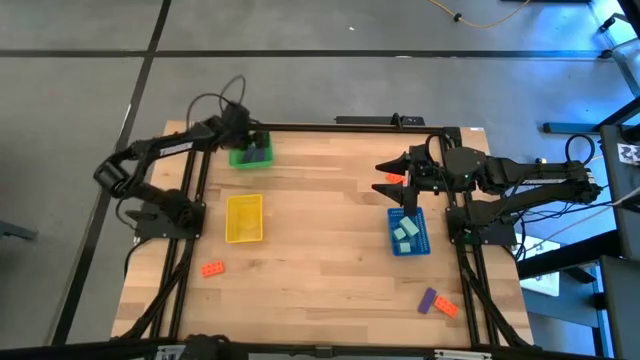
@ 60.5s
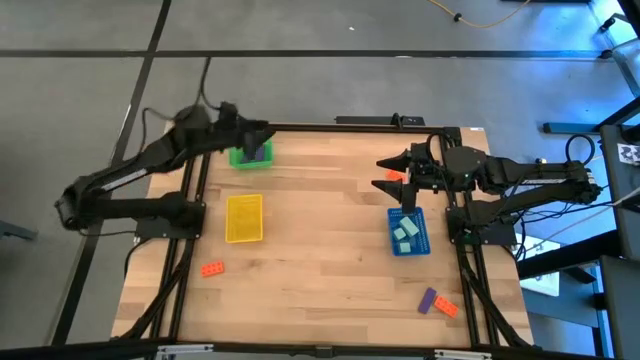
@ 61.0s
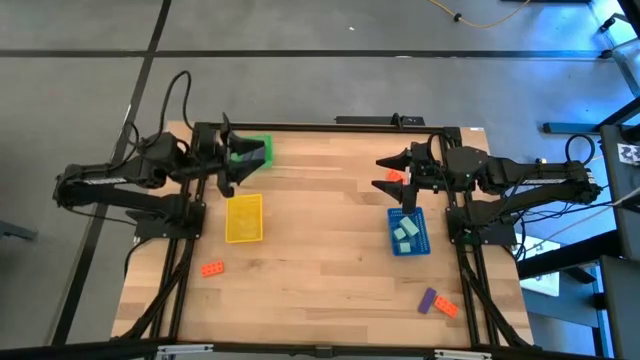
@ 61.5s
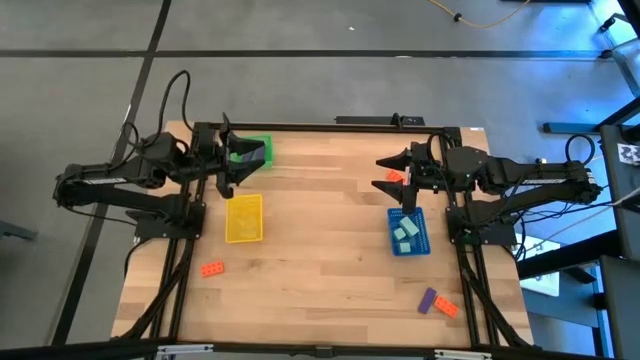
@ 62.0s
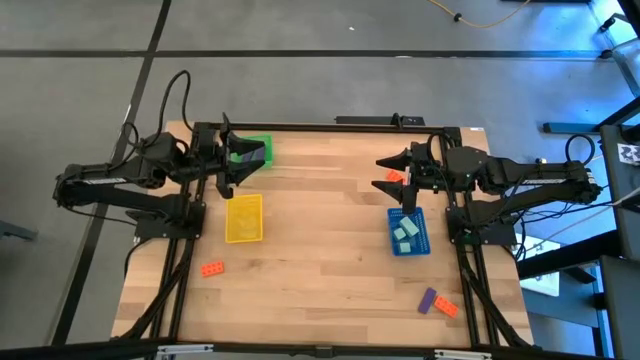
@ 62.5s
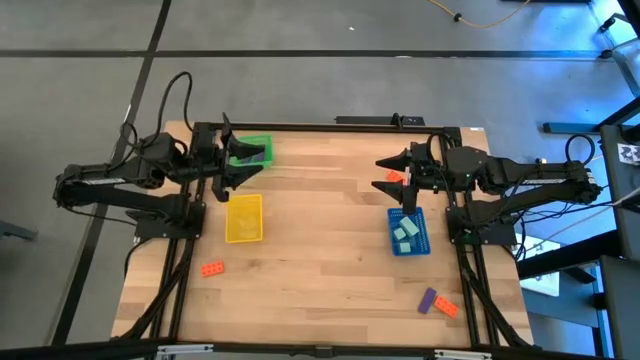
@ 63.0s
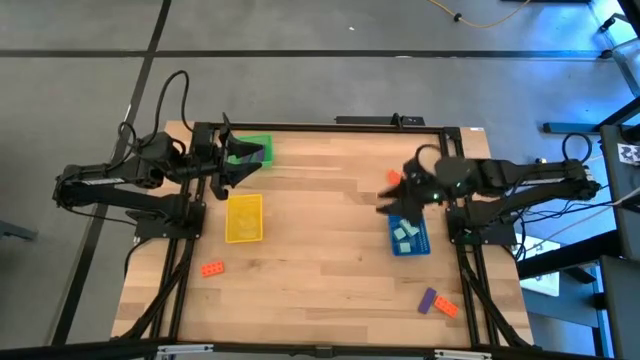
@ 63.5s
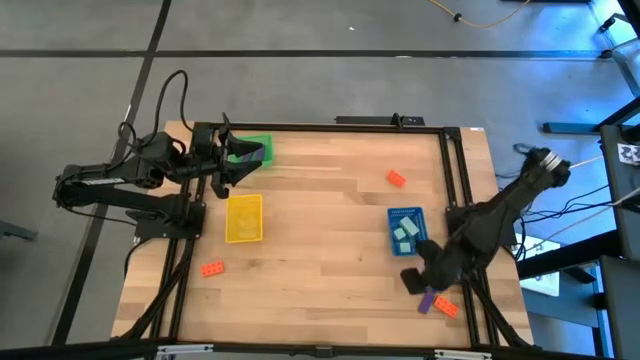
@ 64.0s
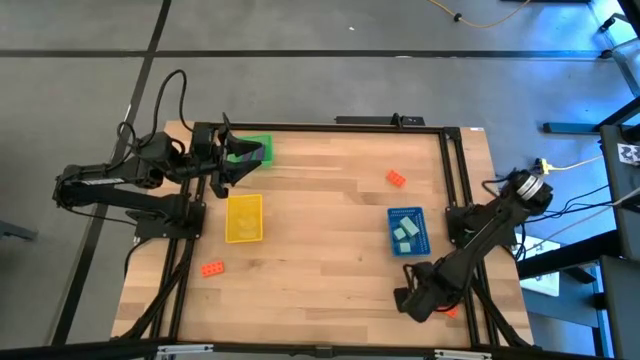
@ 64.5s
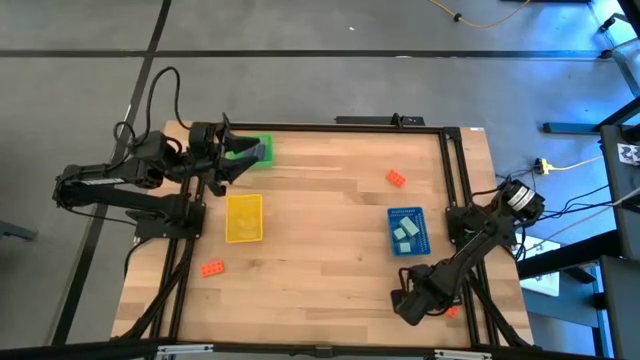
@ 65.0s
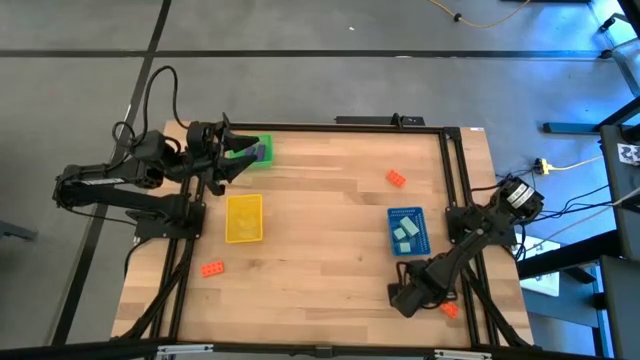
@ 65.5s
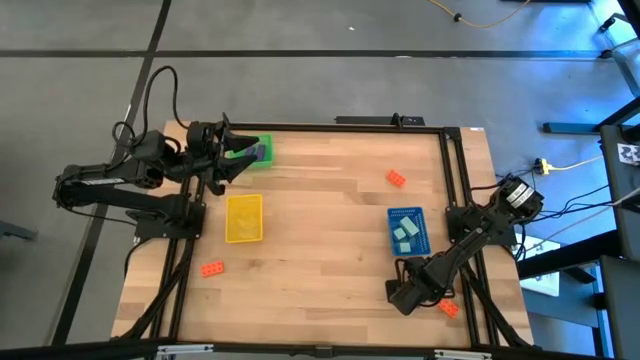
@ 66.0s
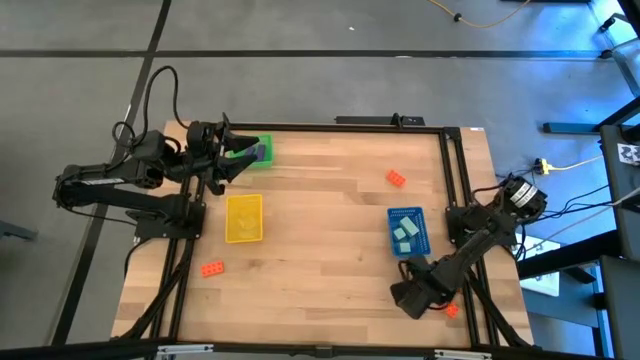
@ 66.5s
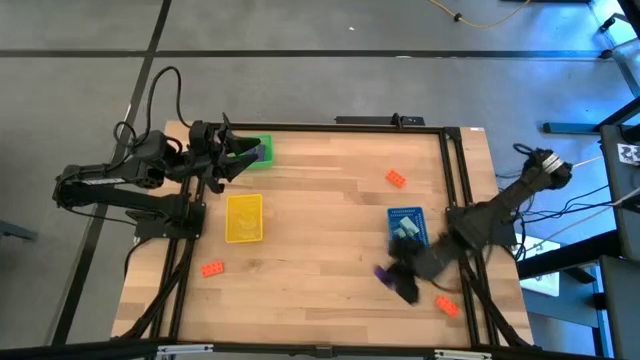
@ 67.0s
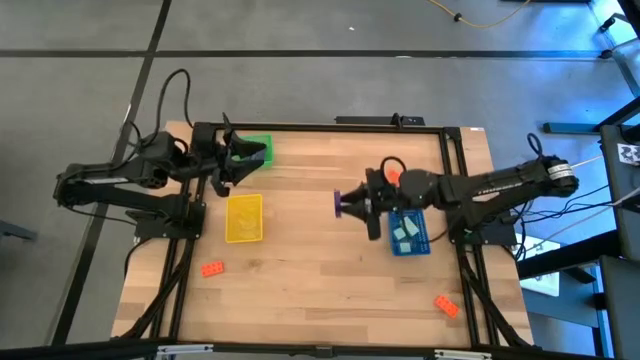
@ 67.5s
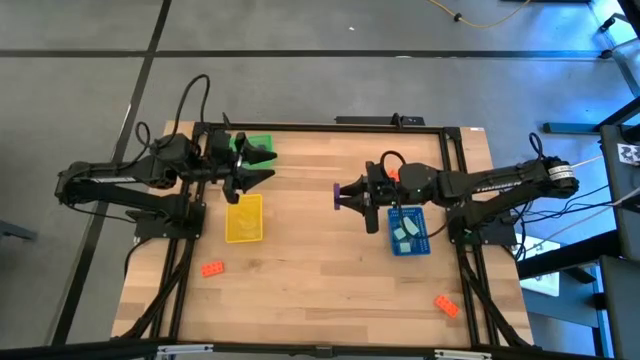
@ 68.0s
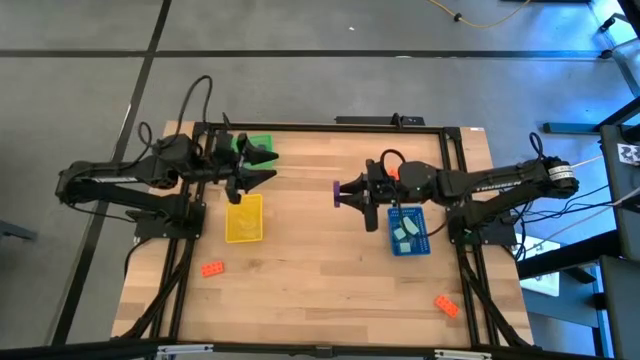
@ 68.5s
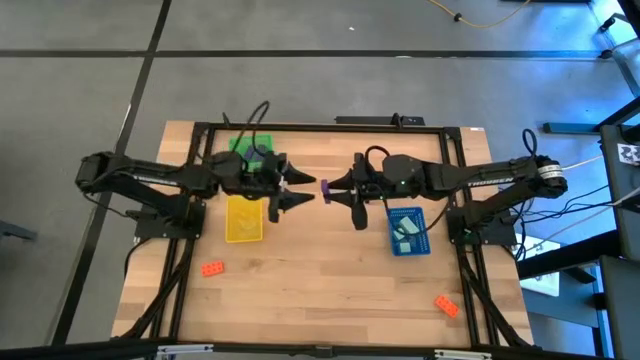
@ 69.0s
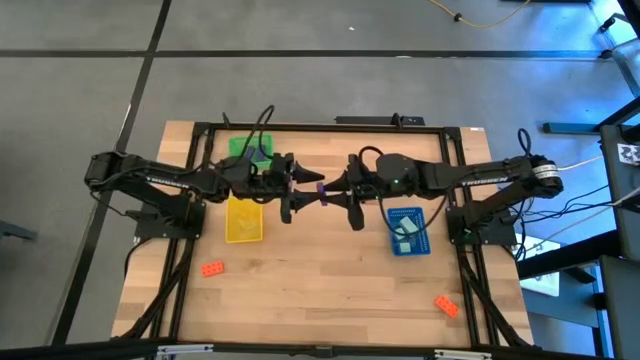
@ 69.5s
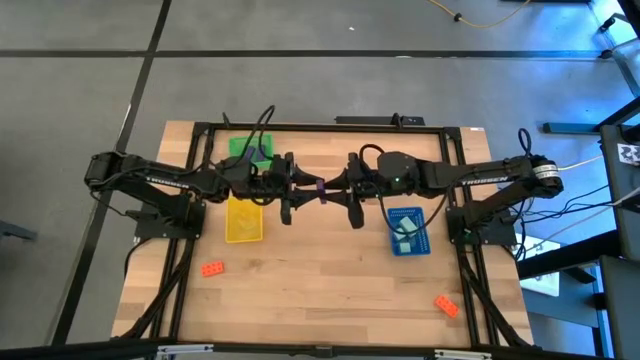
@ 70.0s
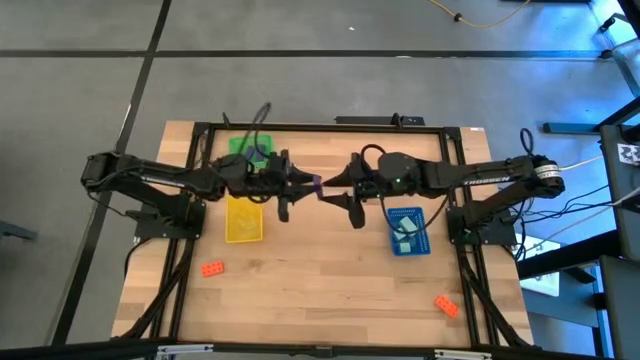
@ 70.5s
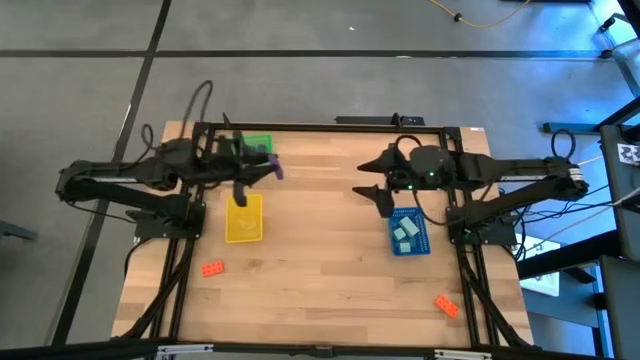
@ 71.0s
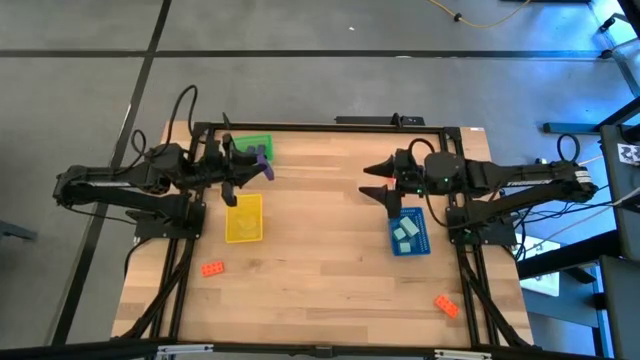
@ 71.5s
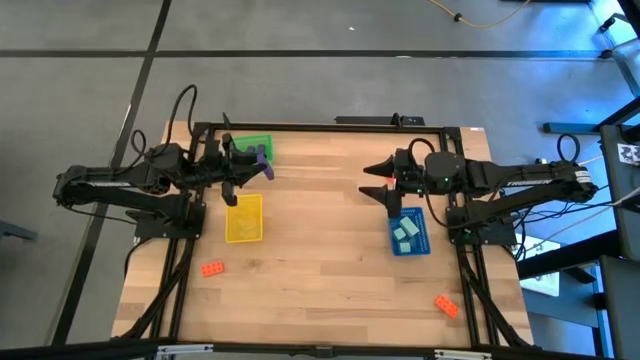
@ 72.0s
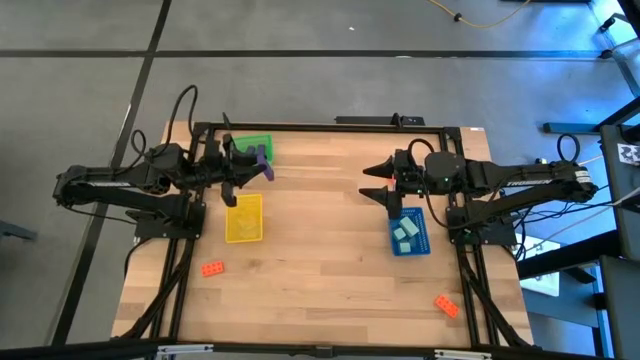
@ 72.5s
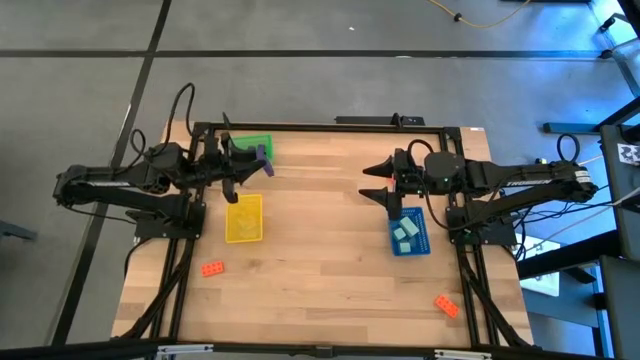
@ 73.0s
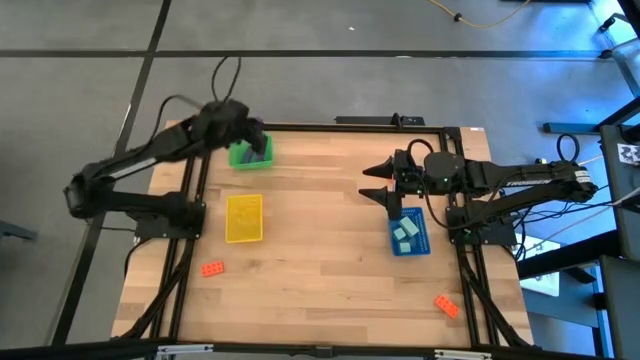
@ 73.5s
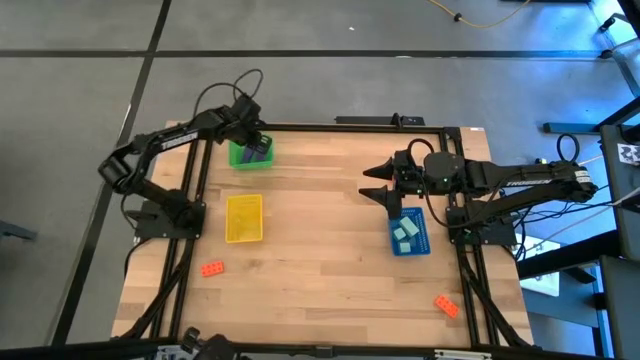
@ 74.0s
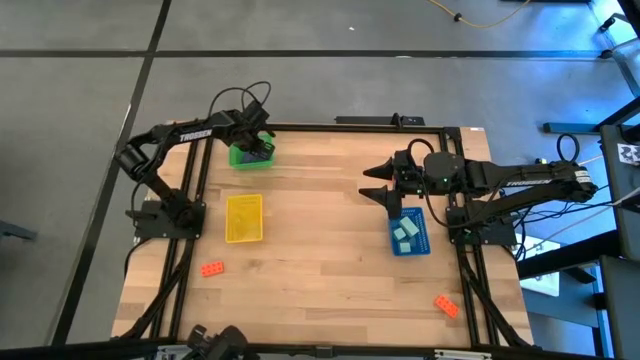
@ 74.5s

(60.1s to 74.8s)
Task: Sort & place blocks by color
Put the violet block into the green bin

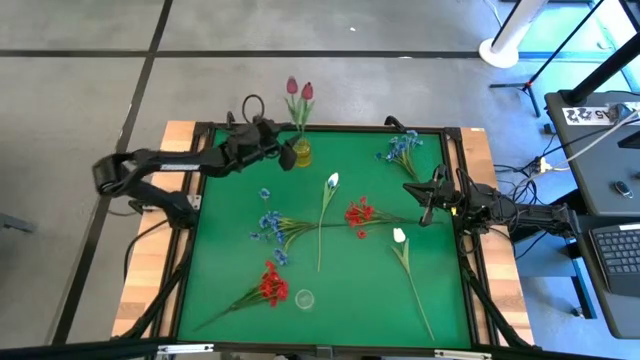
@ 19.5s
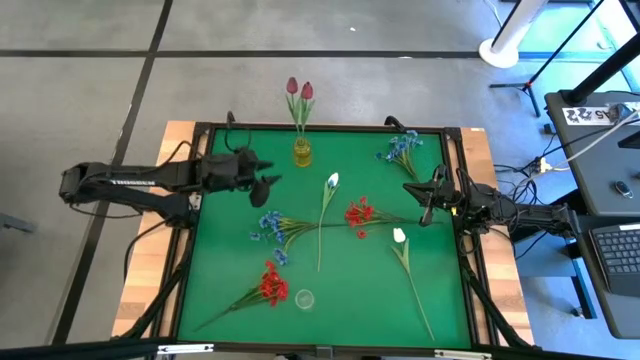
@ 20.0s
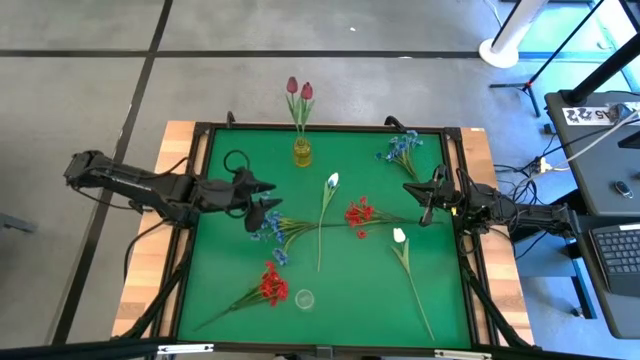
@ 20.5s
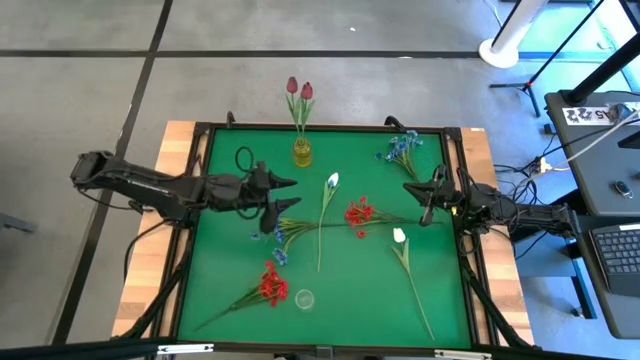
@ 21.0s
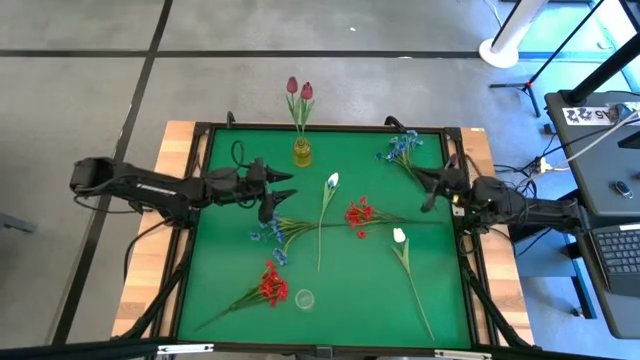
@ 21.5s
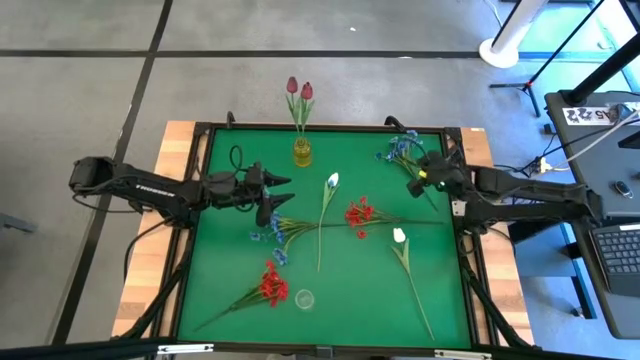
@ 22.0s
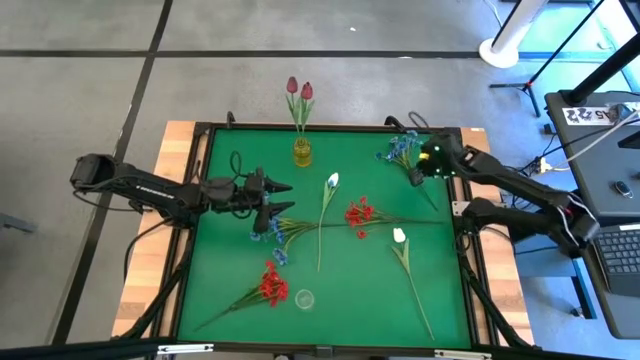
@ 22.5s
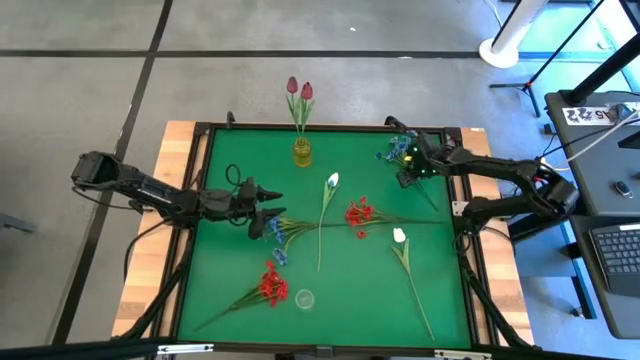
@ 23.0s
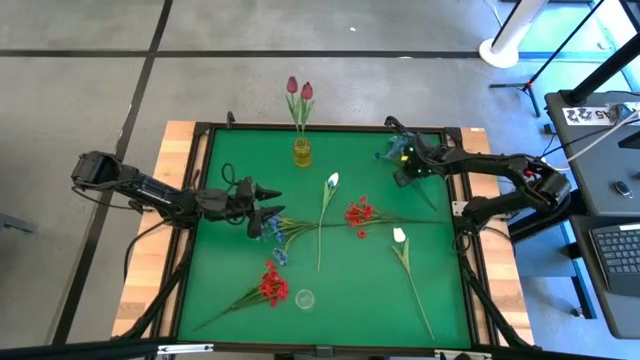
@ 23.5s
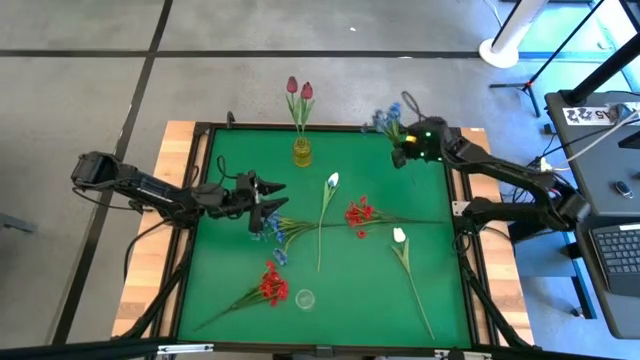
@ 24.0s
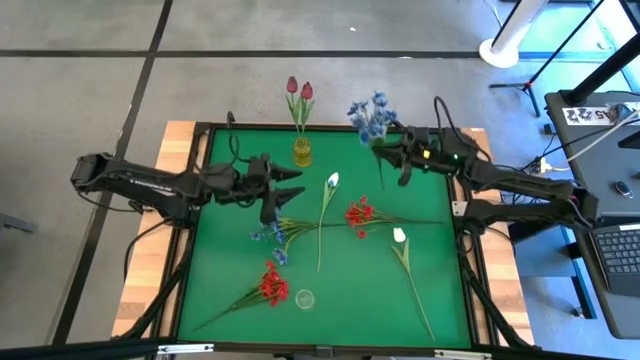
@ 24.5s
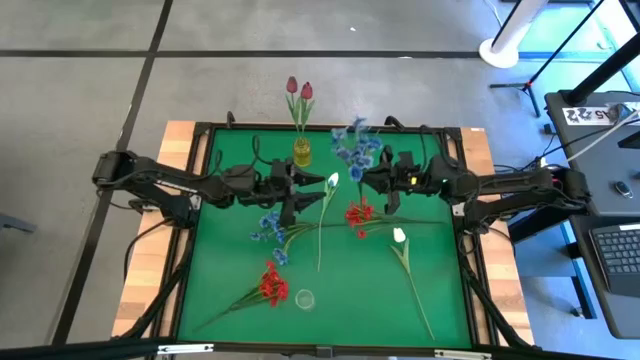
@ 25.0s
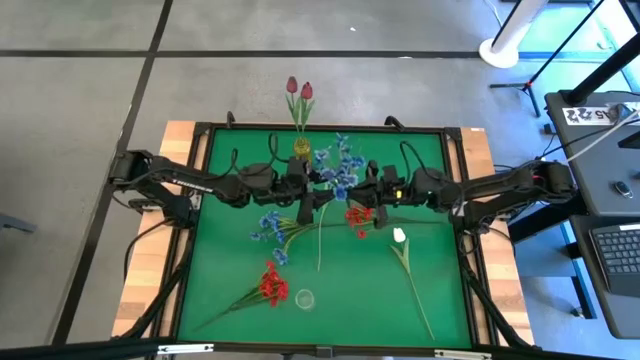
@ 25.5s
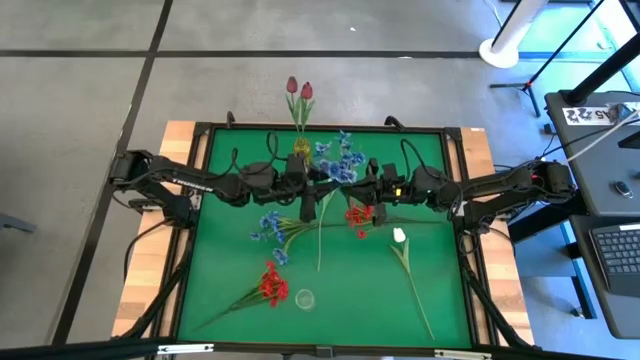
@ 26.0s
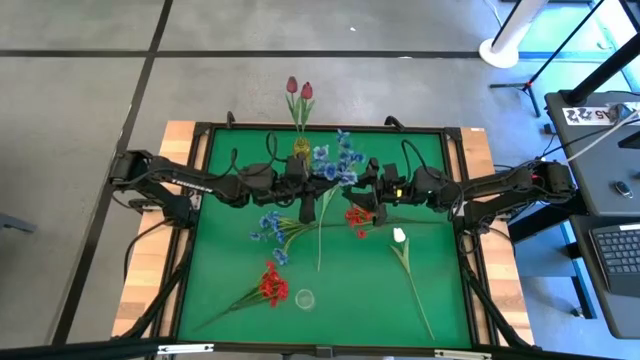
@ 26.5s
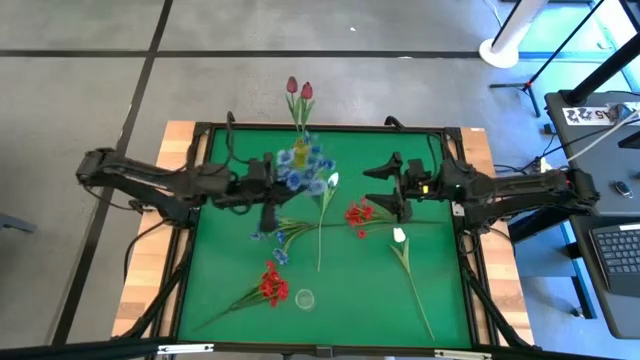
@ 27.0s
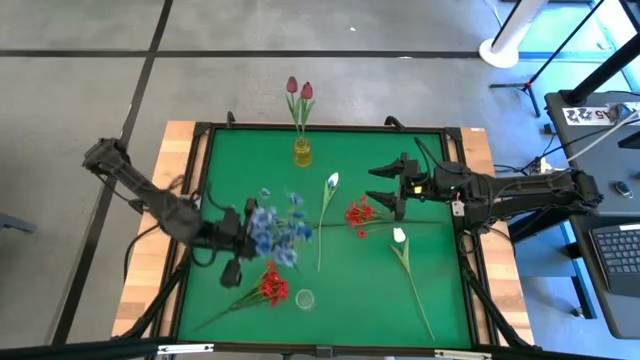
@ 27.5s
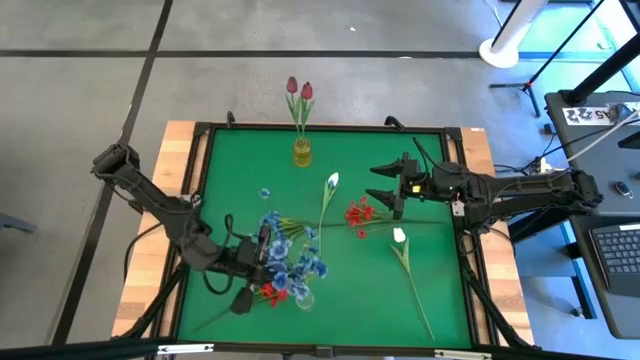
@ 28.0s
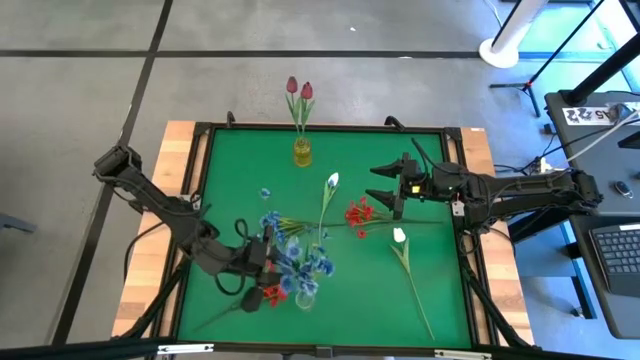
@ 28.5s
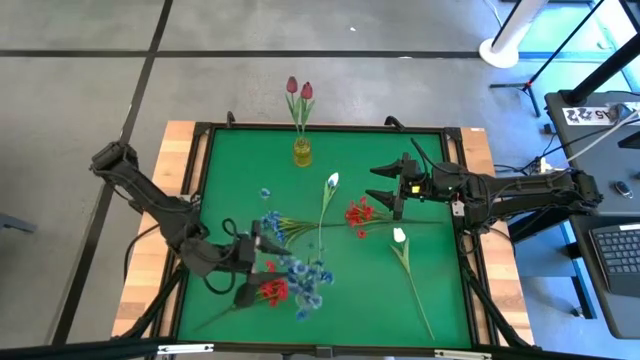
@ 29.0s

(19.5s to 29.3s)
Task: Sort flowers into vase by color
Put the top blue flowers into the transparent vase
